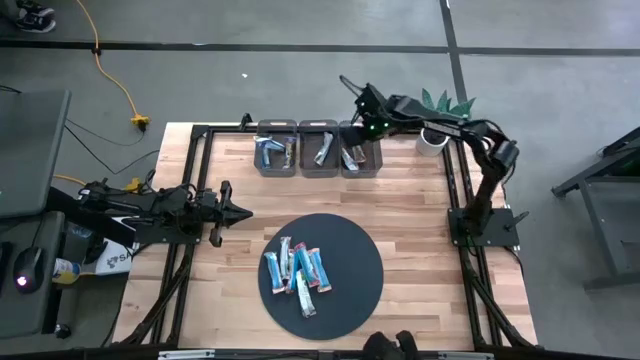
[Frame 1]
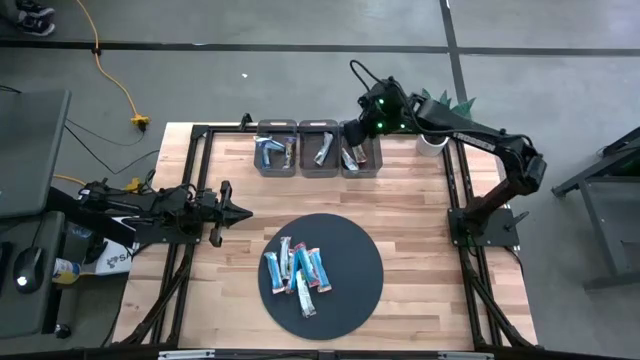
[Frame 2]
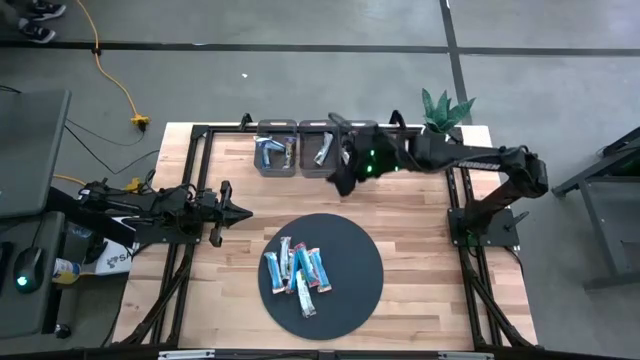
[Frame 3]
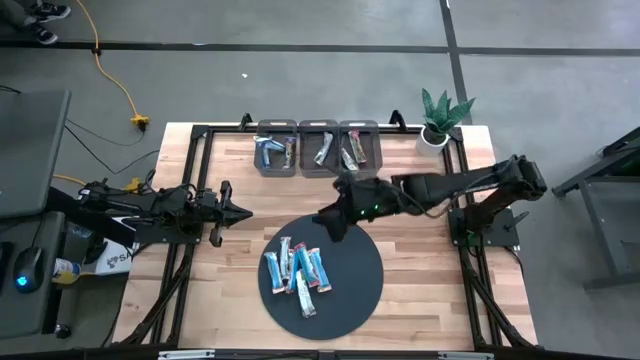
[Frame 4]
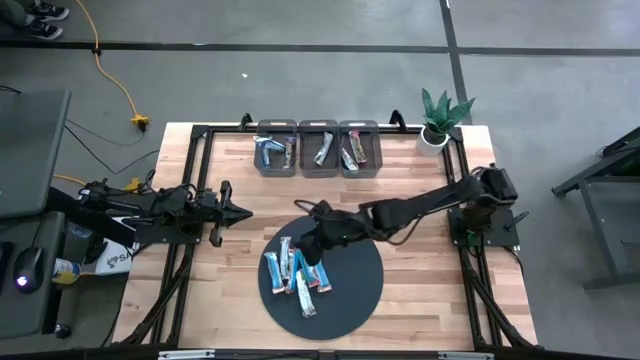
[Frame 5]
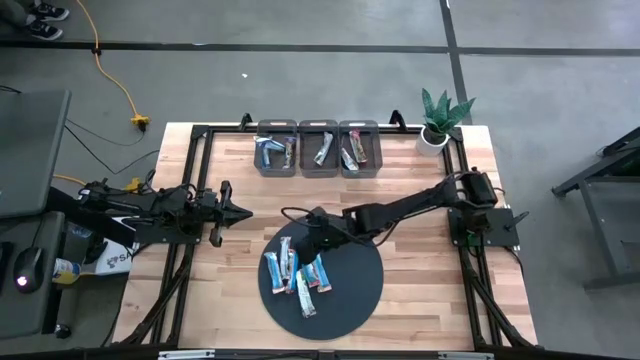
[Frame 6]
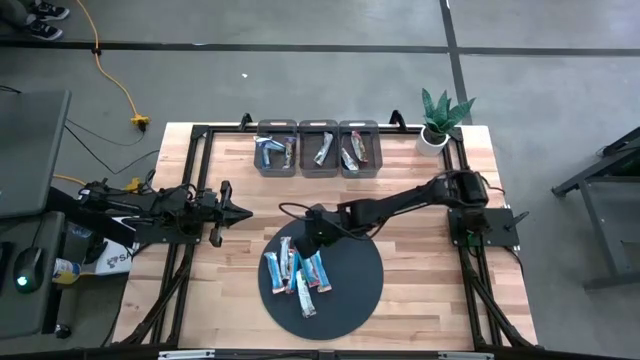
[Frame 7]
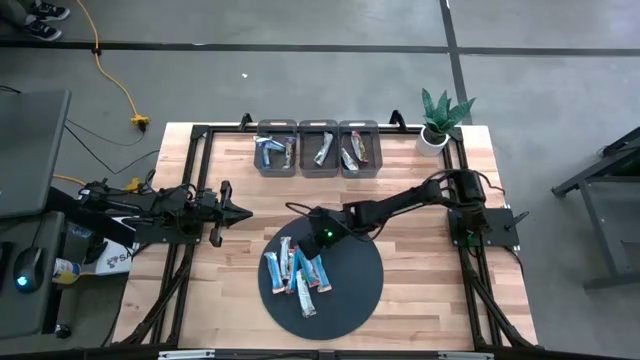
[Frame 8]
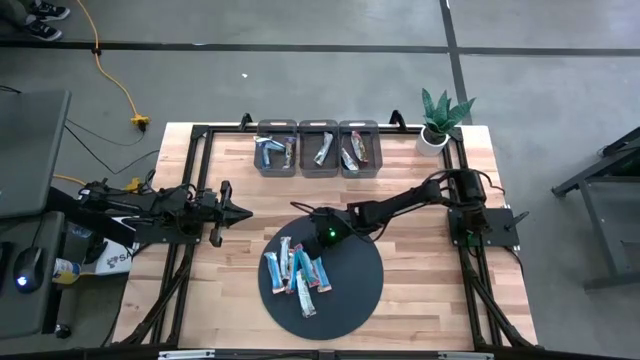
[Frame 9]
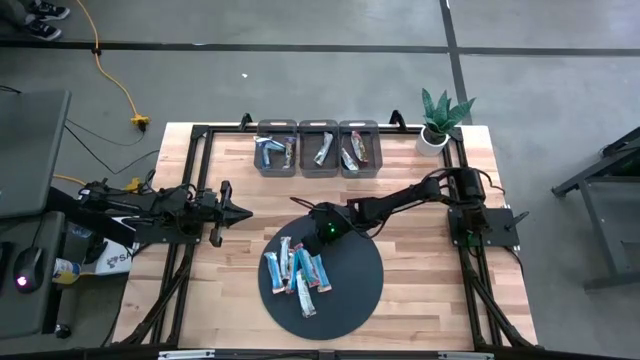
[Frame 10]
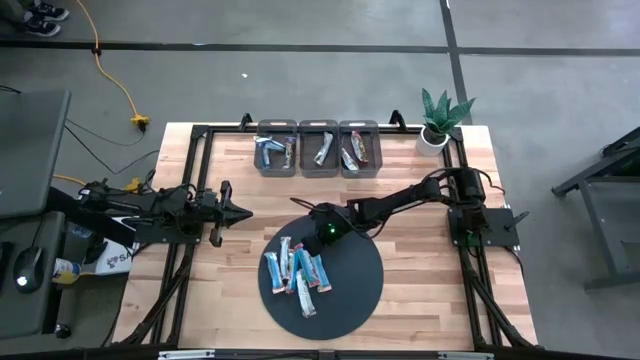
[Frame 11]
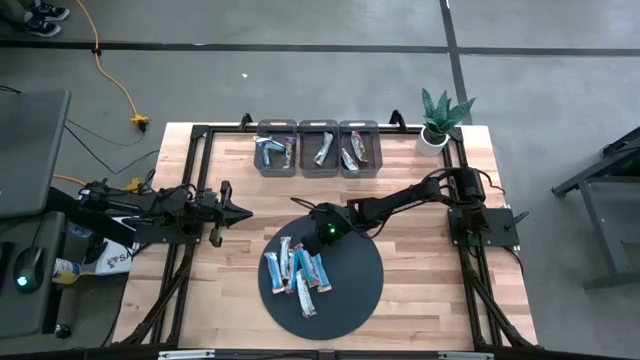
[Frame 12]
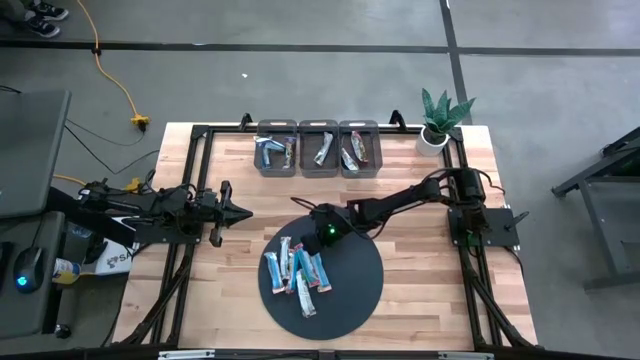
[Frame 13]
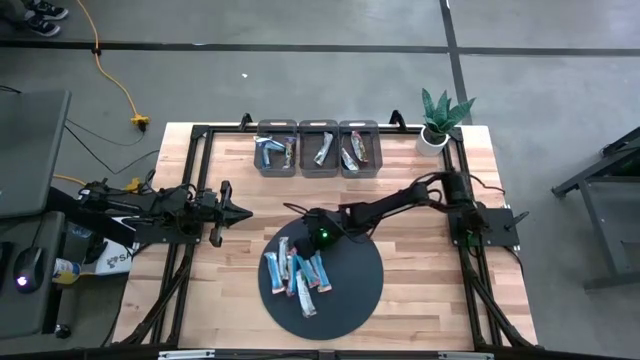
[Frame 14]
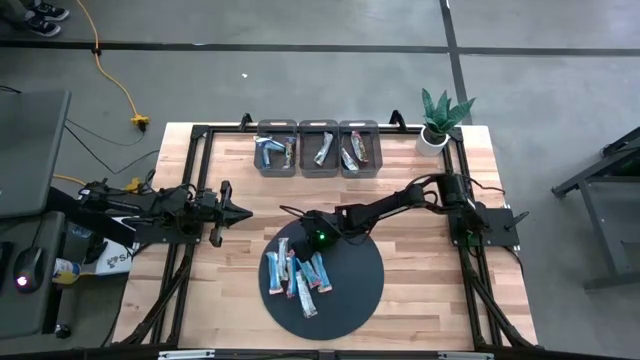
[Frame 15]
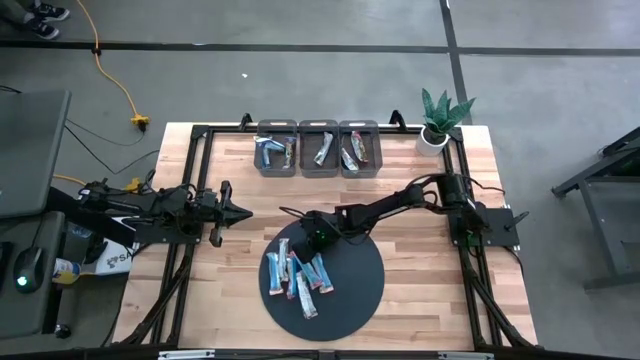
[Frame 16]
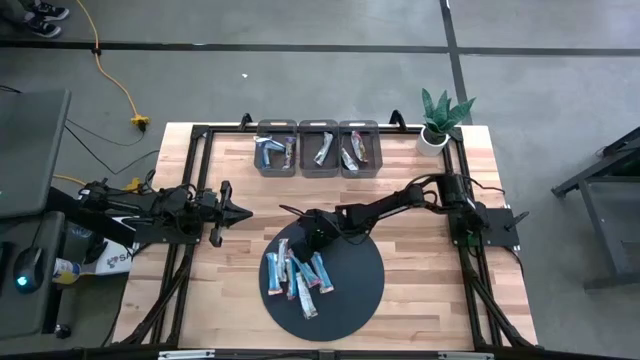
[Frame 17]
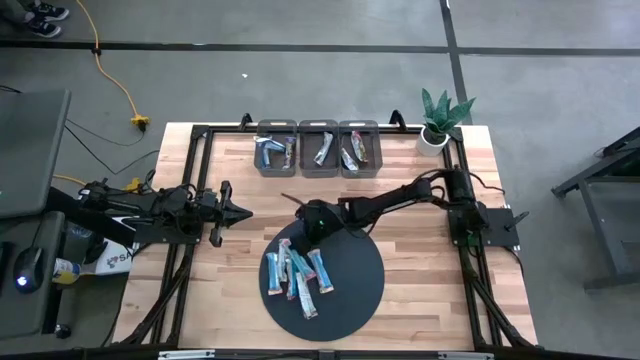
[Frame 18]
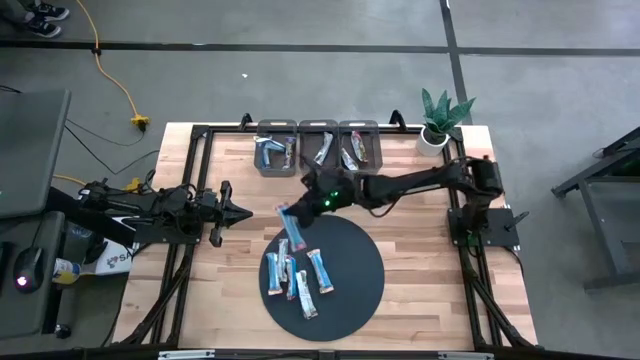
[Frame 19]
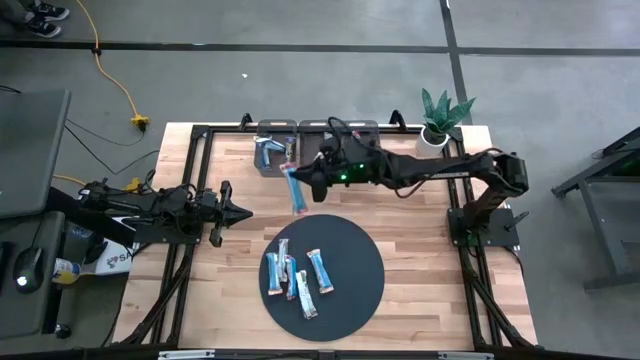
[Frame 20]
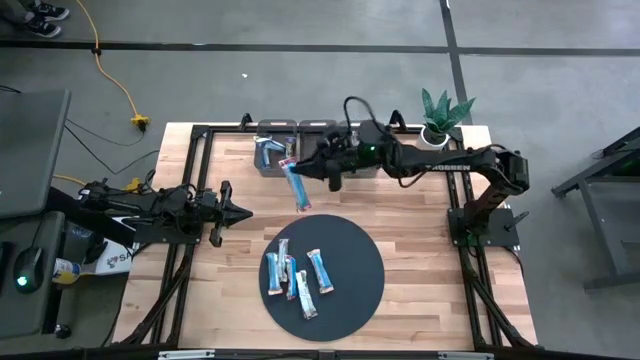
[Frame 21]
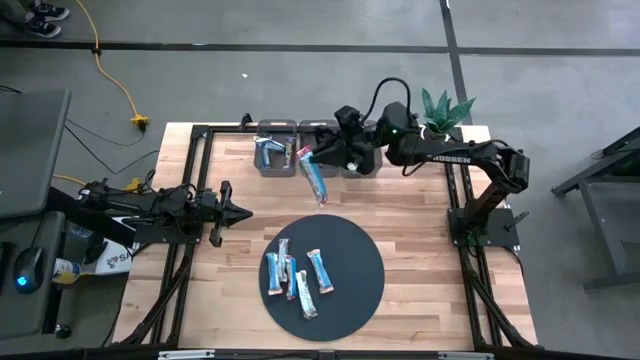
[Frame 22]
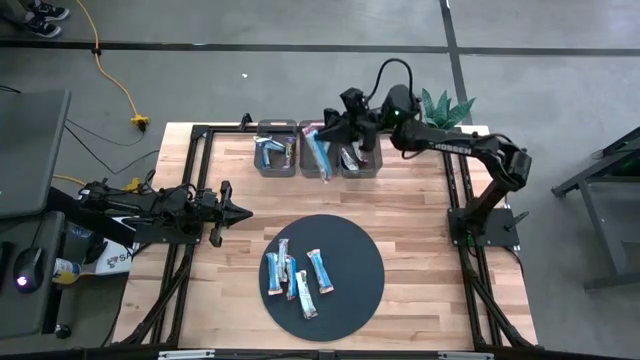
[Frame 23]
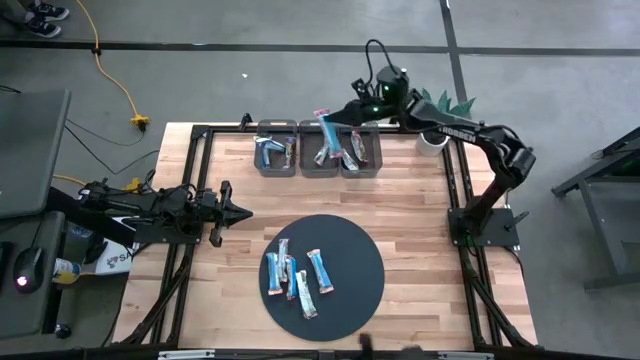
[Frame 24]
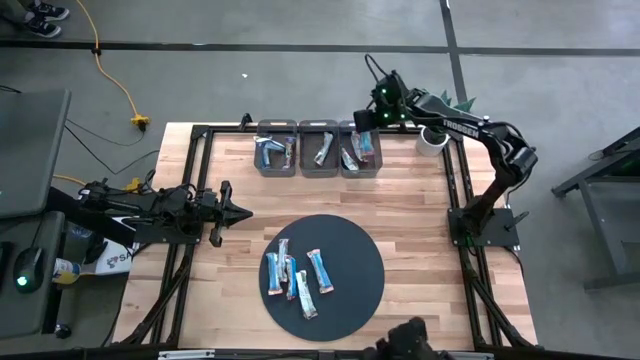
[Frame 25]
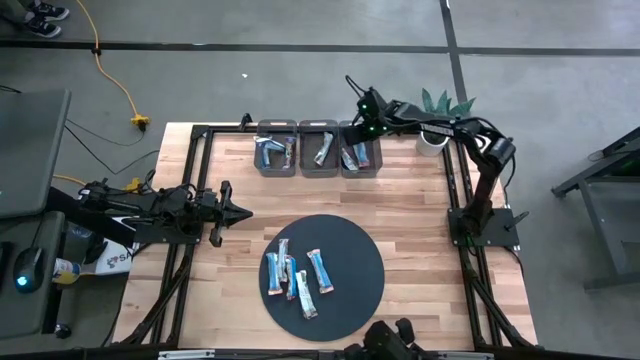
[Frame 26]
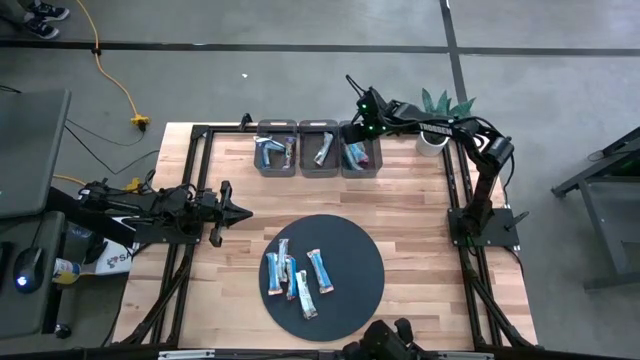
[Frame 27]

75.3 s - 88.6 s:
Task: Pick and place Granola Bars by type
Put the red granola bar into the right black bin

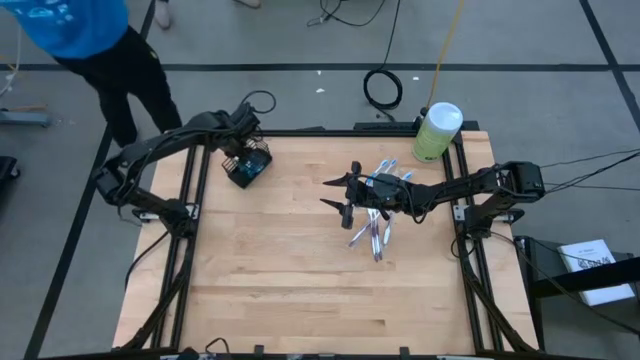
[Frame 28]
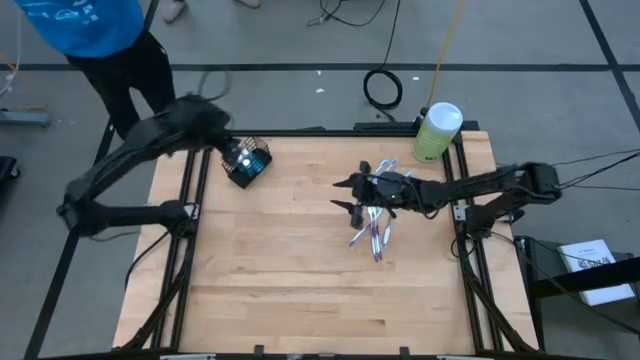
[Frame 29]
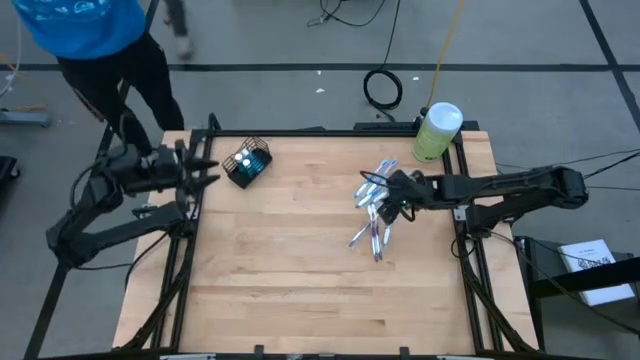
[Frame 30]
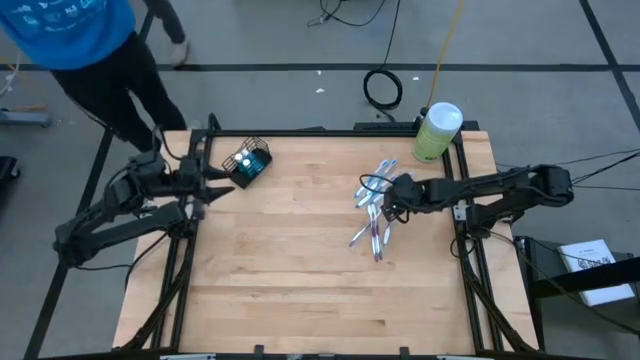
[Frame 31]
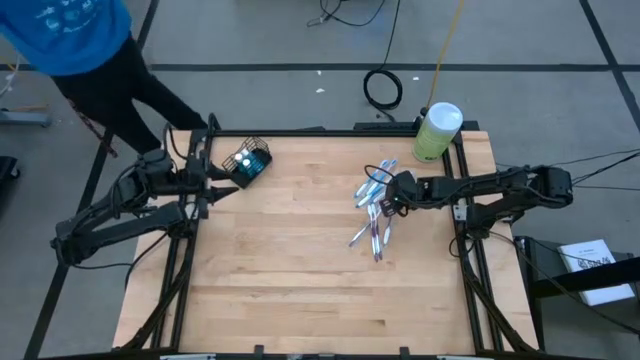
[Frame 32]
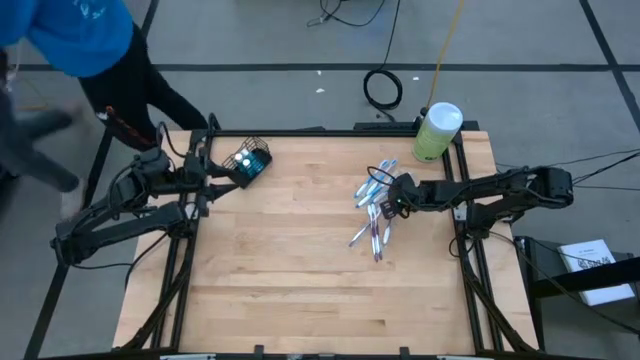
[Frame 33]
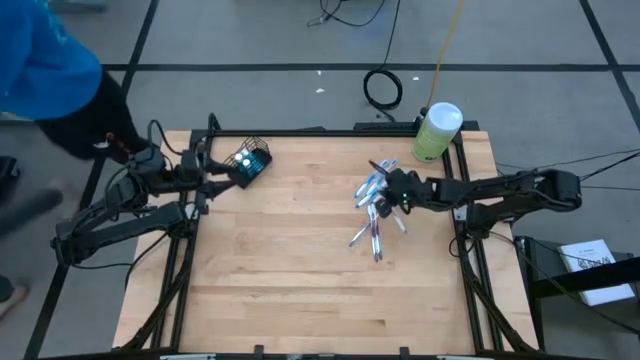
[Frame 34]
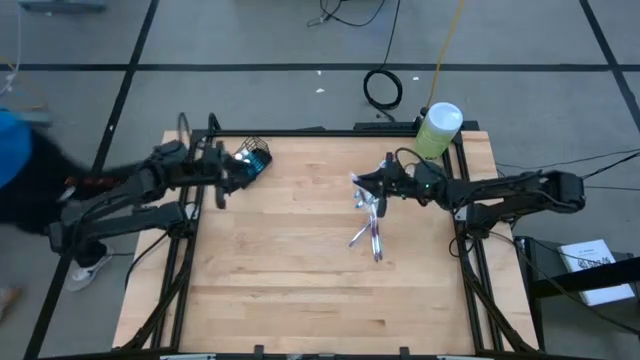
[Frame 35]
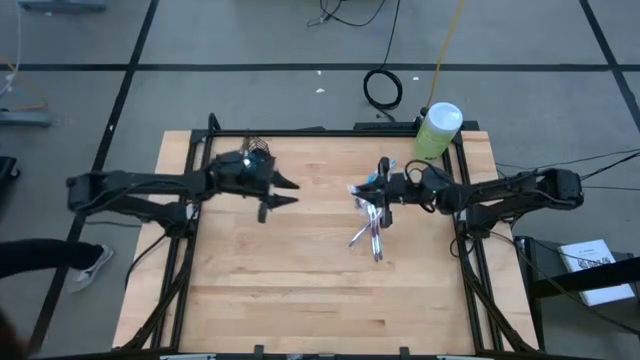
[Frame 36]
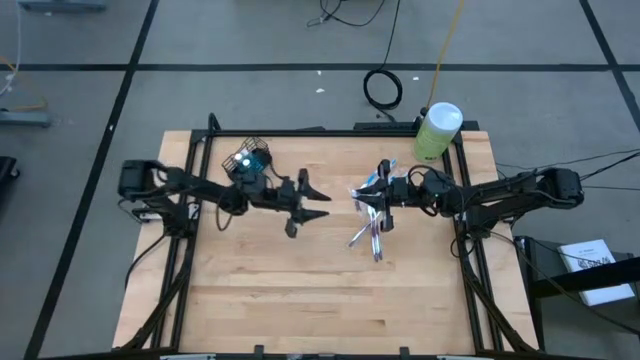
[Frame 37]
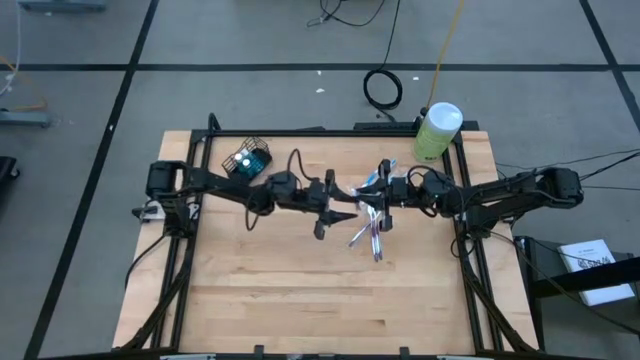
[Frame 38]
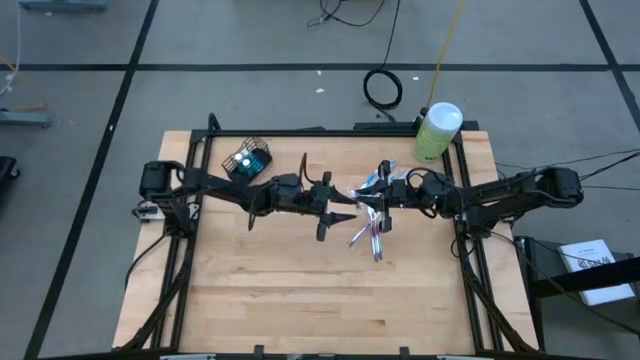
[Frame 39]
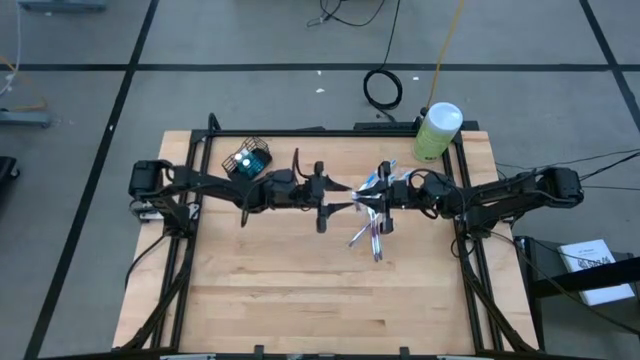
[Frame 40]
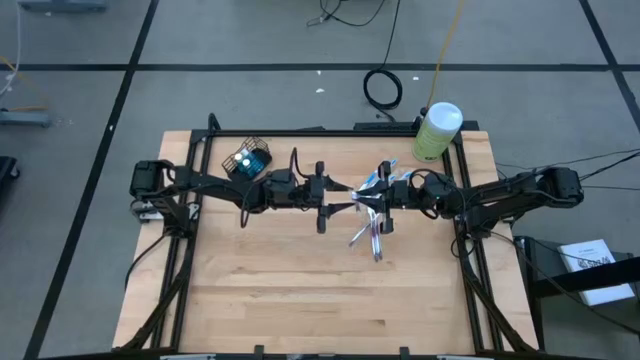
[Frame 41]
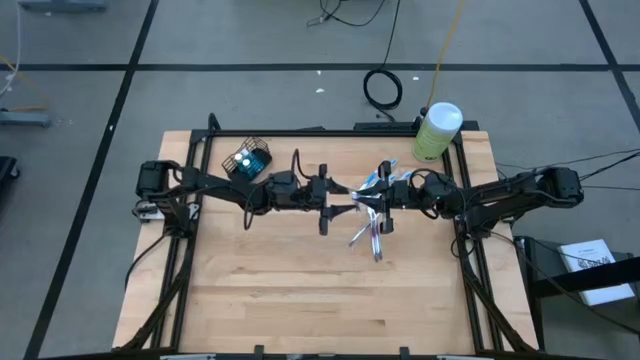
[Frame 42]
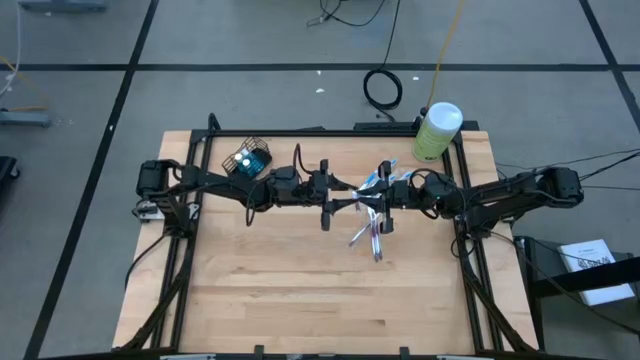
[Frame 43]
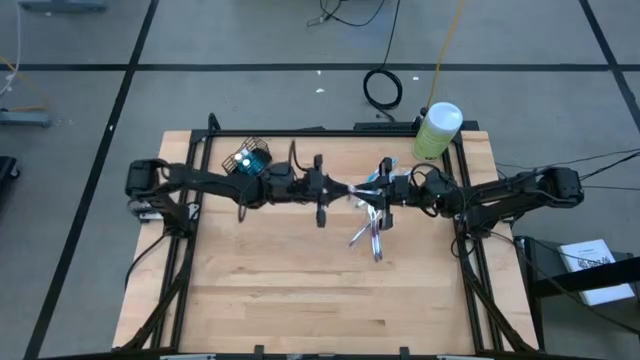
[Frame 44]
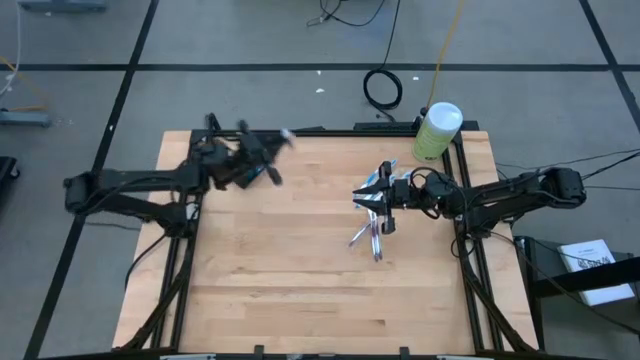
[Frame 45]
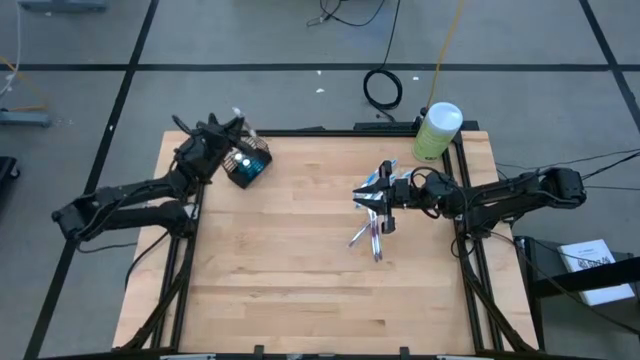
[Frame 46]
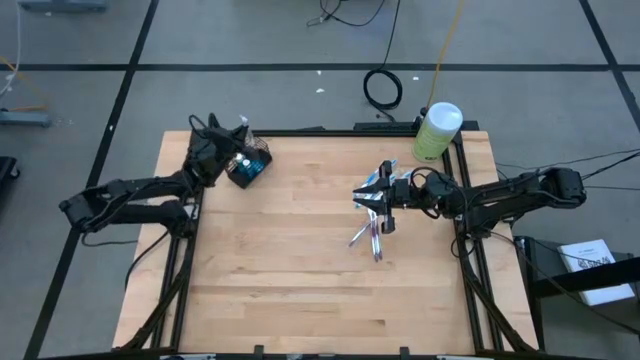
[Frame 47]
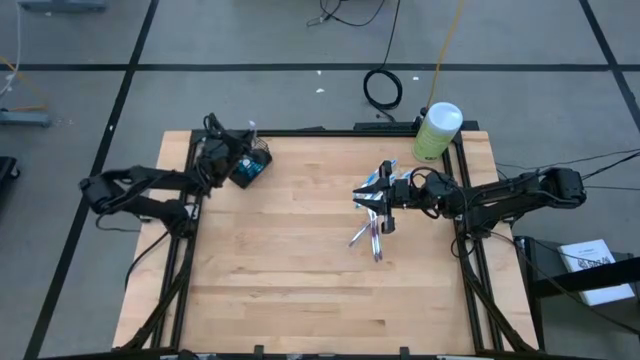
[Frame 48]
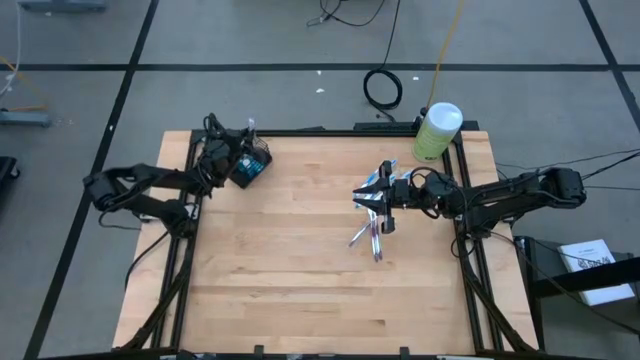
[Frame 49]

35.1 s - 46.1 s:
Task: Pick & Place toothbrushing station
Put the purple toothbrush into the wire organizer
